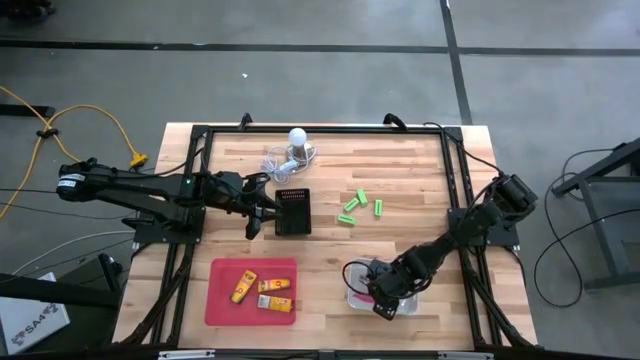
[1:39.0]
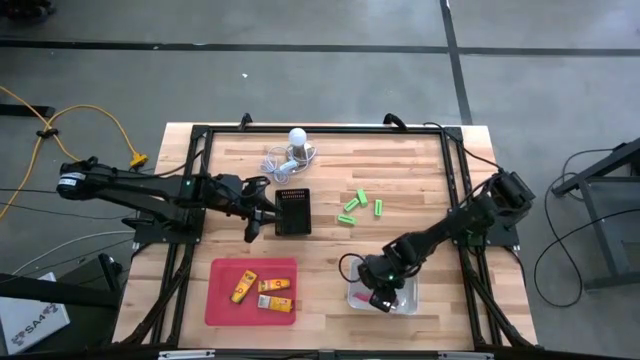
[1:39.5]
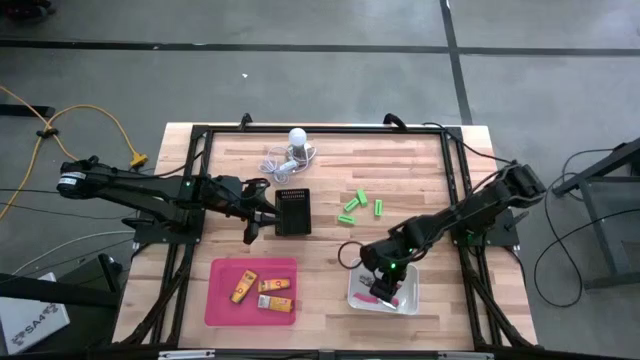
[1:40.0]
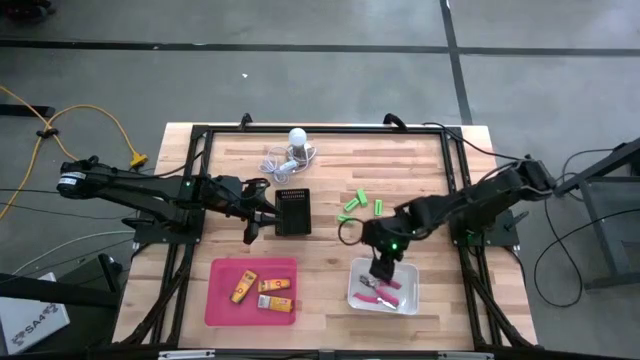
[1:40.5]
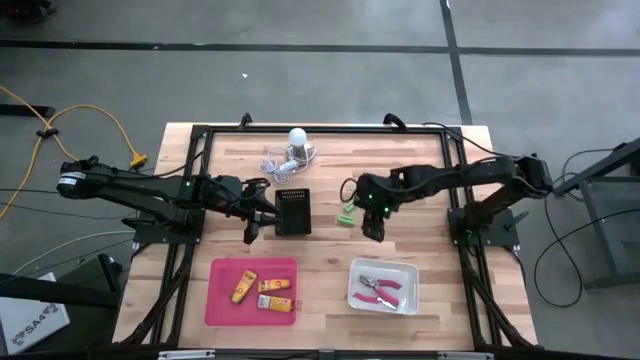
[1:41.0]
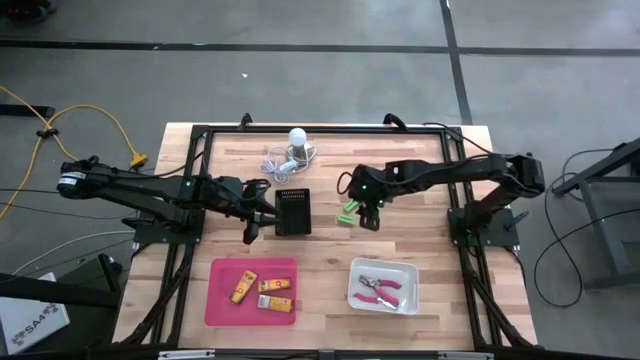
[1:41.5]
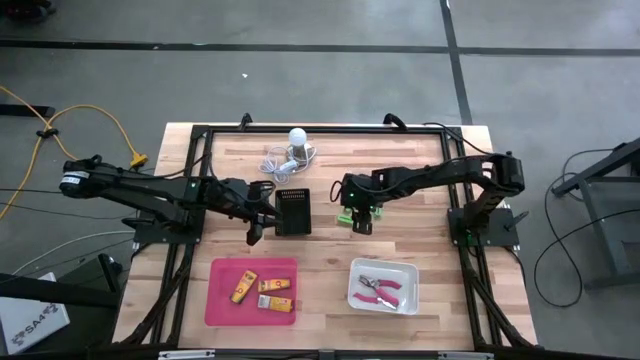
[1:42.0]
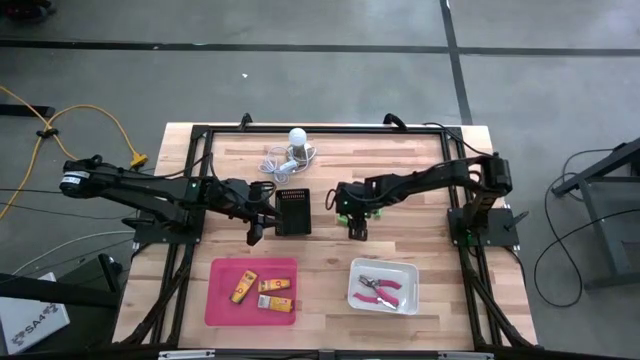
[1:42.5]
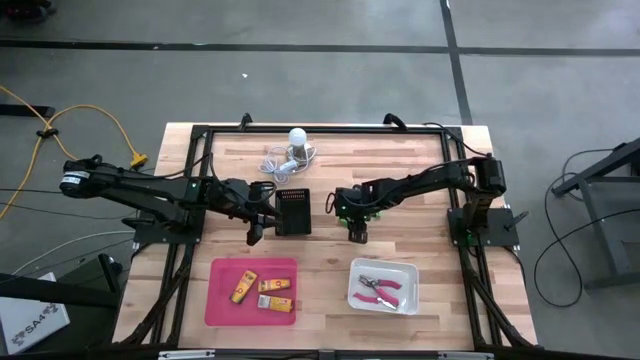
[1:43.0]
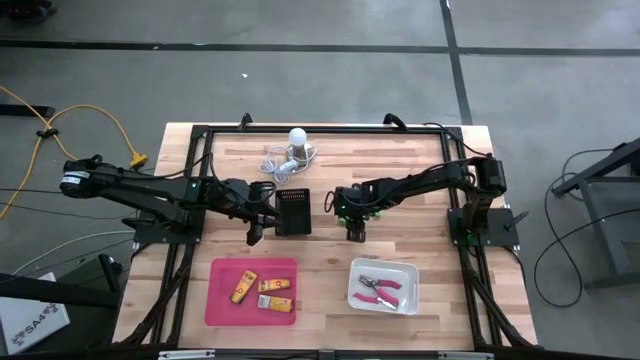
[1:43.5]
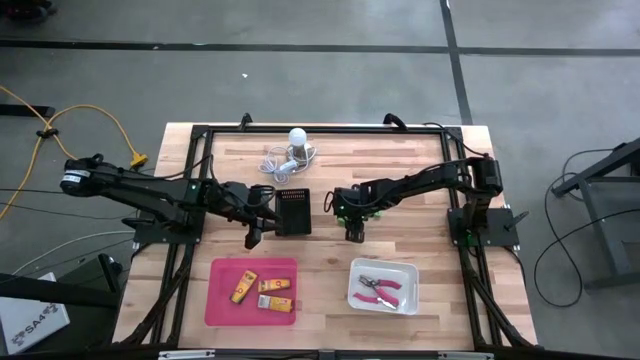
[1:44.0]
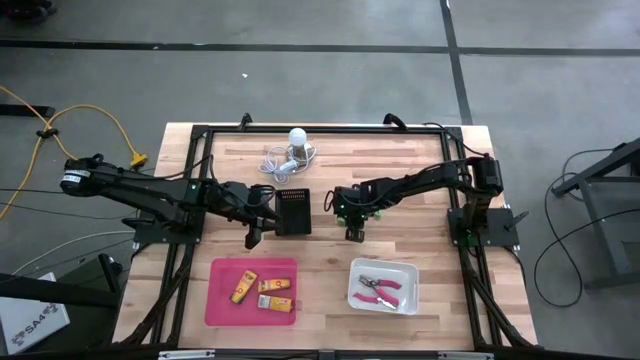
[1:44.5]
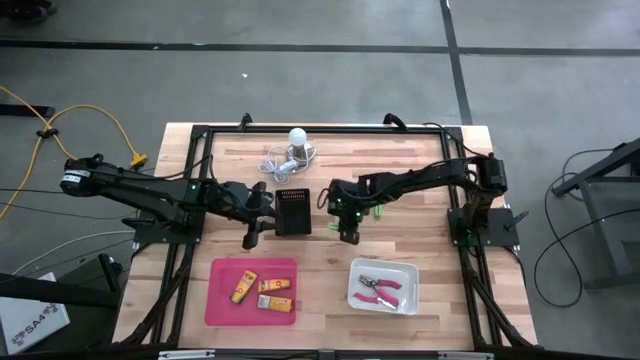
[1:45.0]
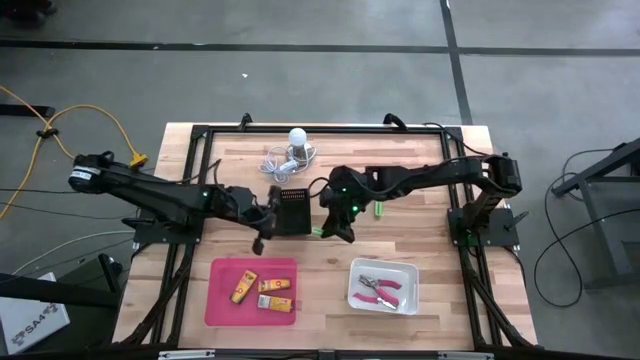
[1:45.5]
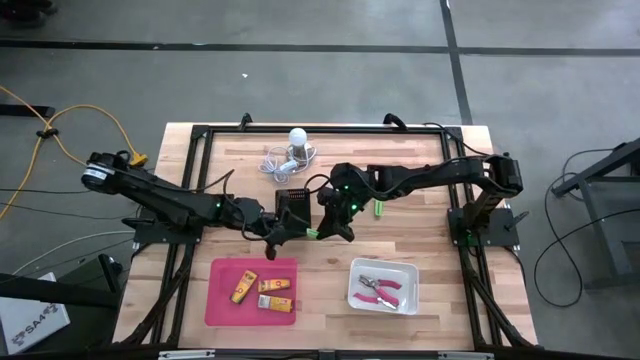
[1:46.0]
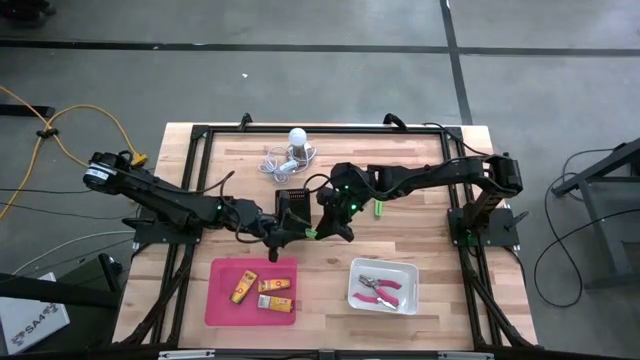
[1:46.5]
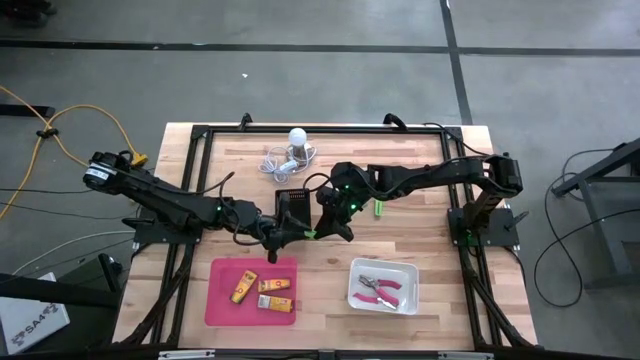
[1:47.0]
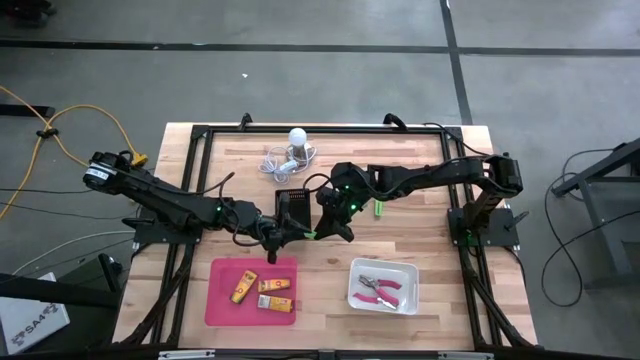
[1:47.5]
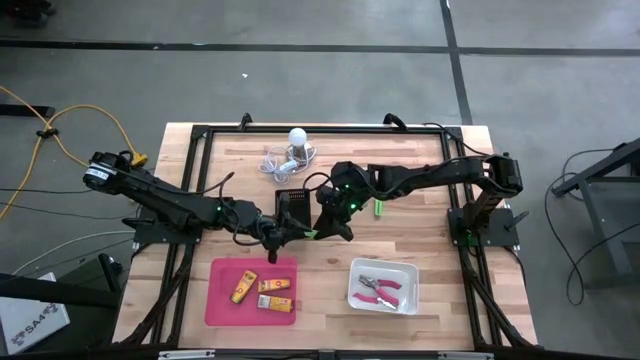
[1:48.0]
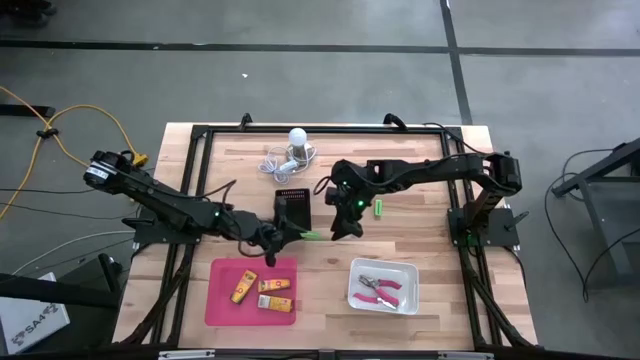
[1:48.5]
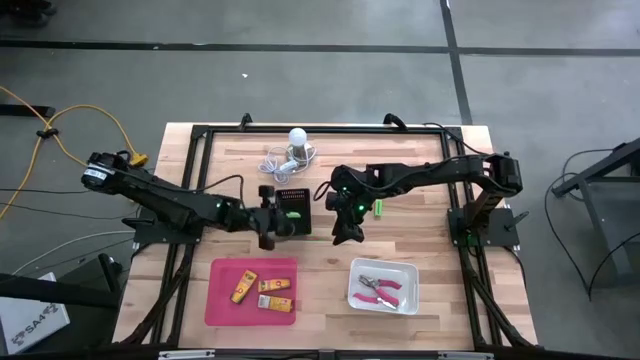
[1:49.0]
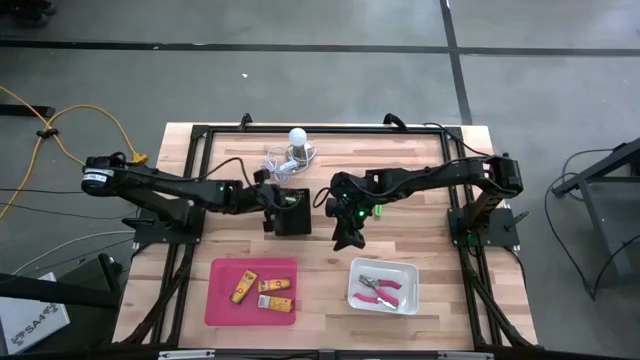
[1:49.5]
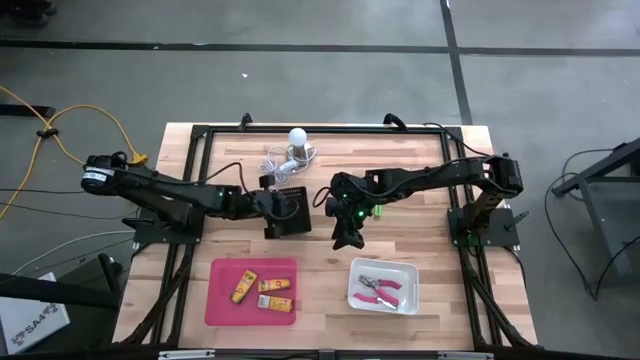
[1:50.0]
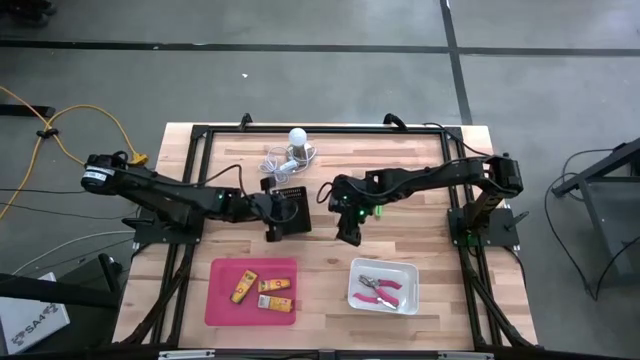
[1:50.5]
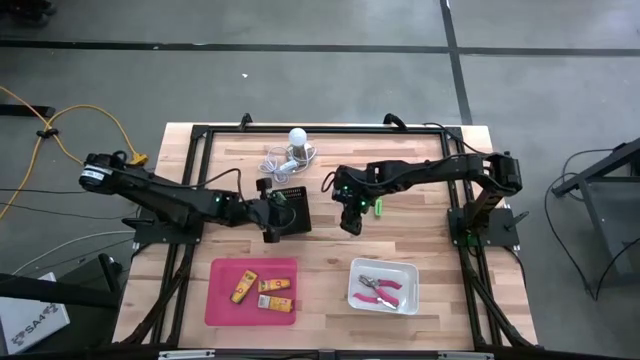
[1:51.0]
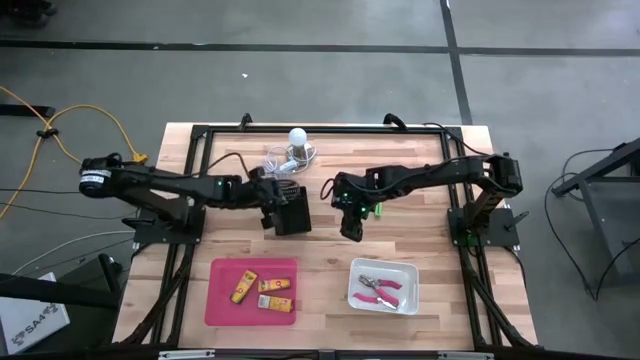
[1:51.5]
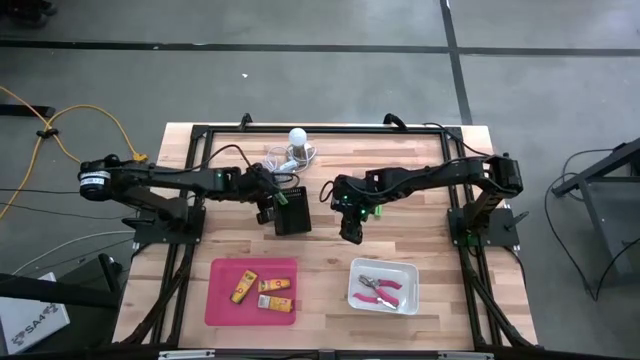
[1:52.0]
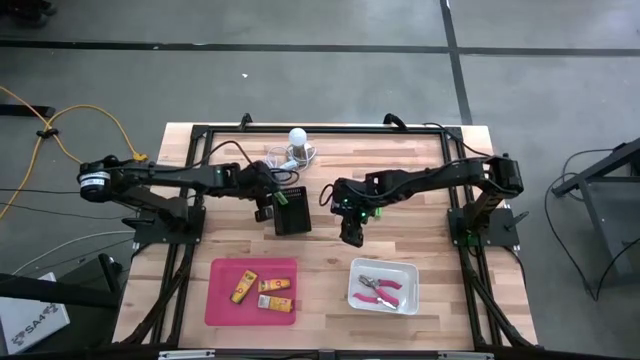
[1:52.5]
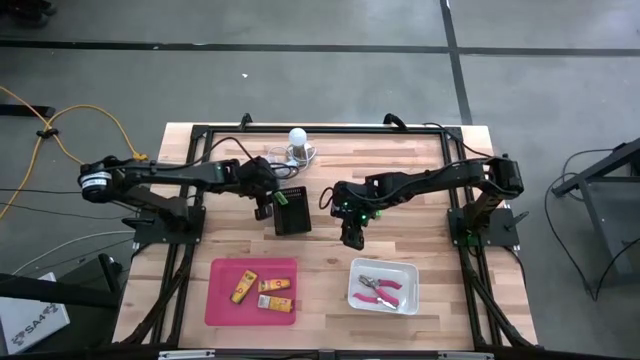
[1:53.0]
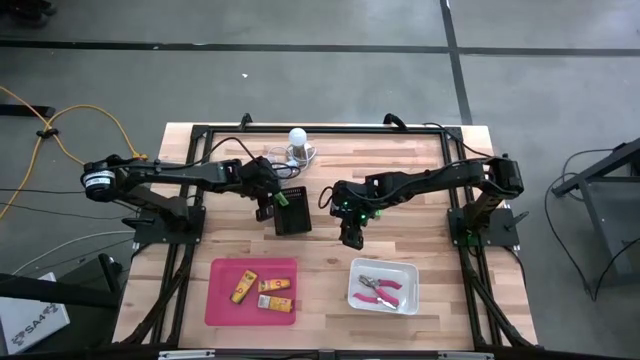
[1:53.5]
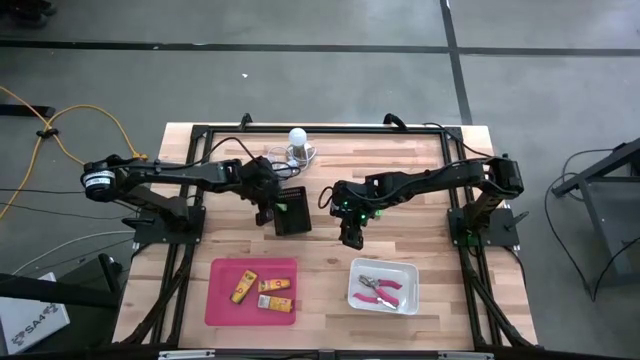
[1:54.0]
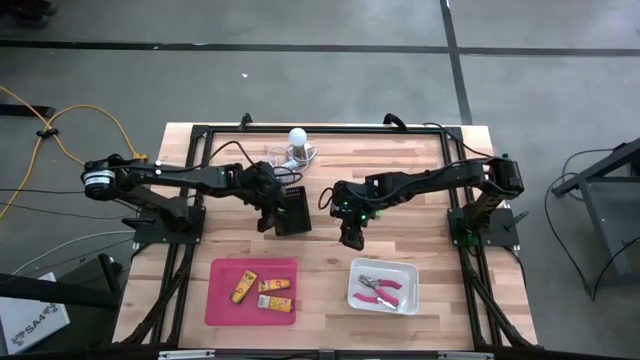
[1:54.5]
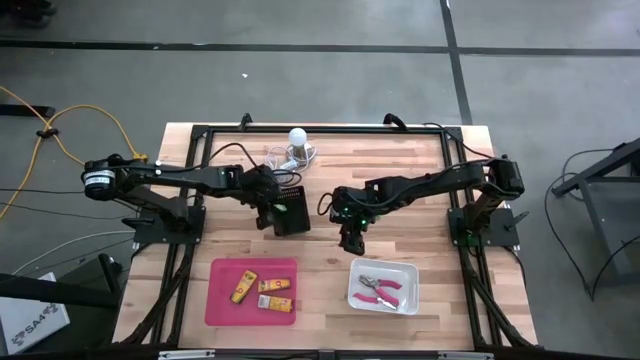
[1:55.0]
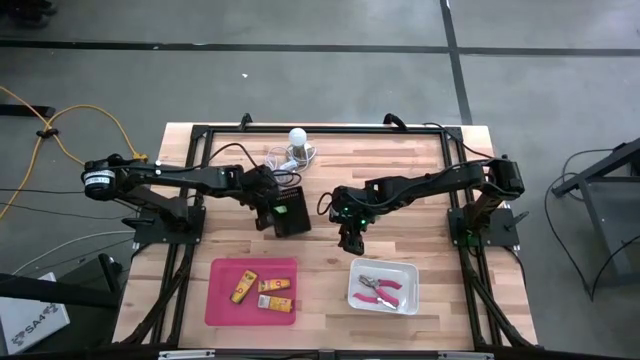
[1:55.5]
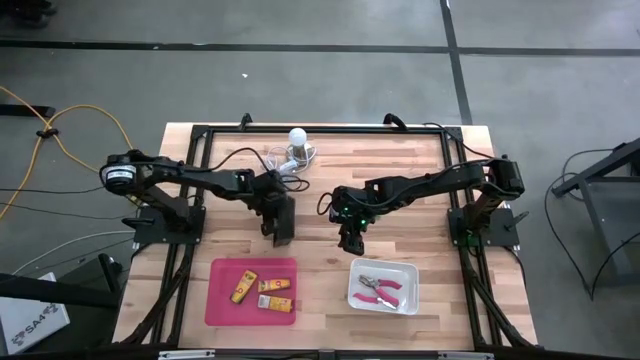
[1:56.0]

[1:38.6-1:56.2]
Task: Pick & Place School Supplies
Put the green eraser into the black bin

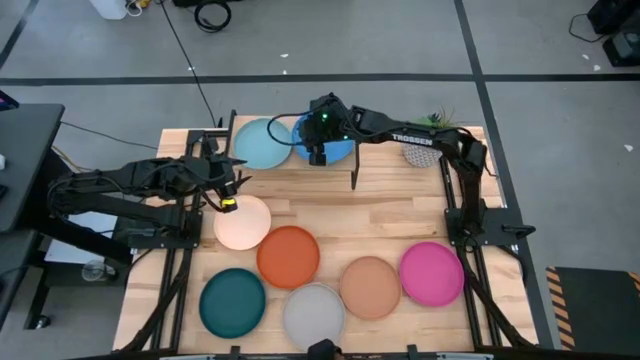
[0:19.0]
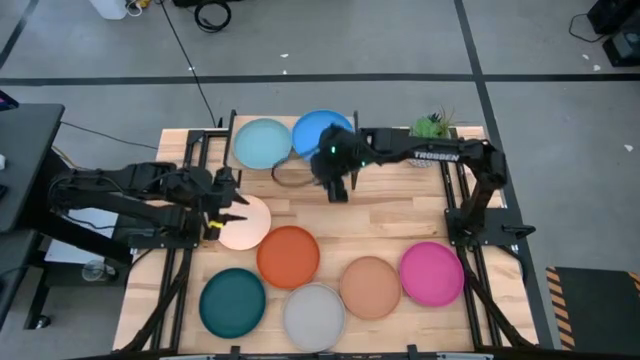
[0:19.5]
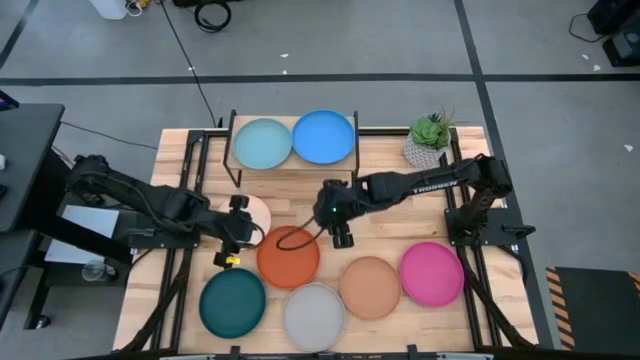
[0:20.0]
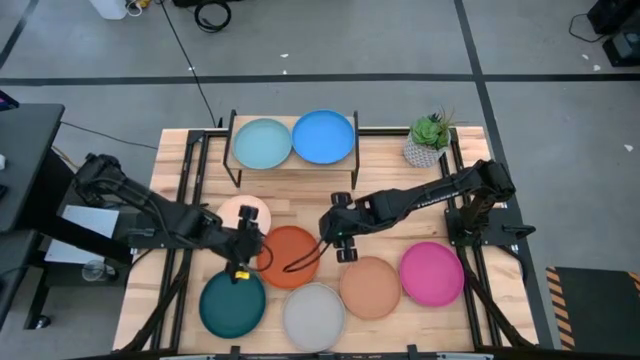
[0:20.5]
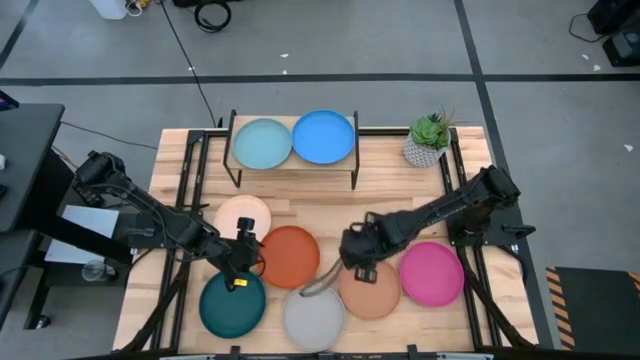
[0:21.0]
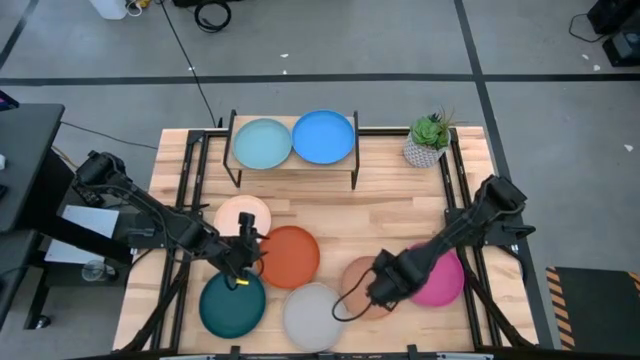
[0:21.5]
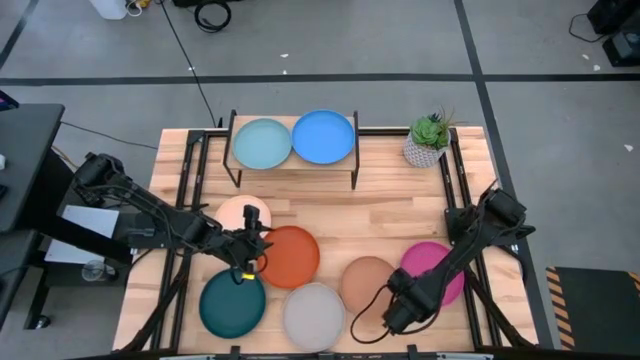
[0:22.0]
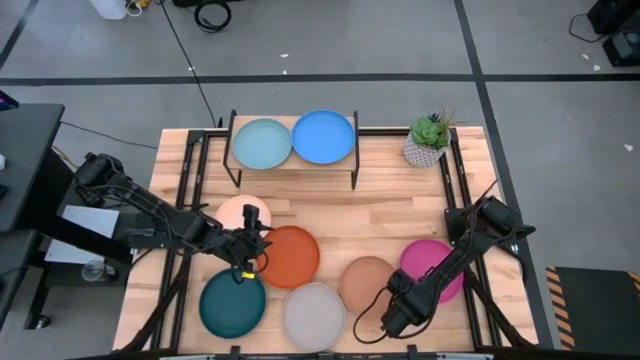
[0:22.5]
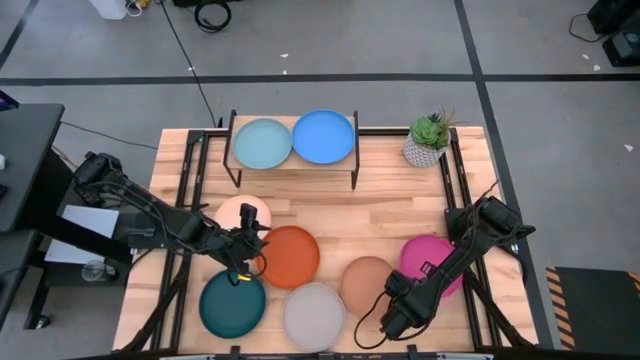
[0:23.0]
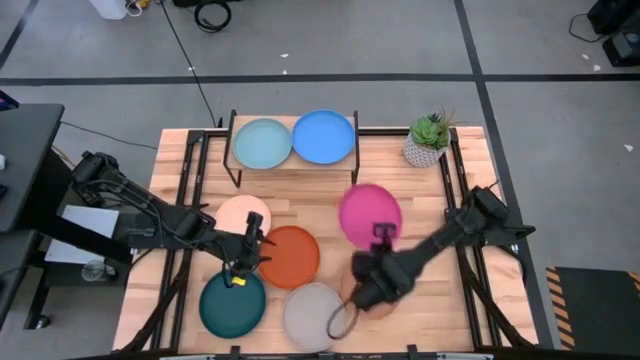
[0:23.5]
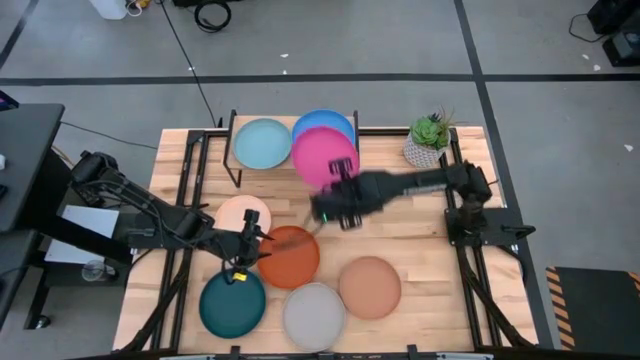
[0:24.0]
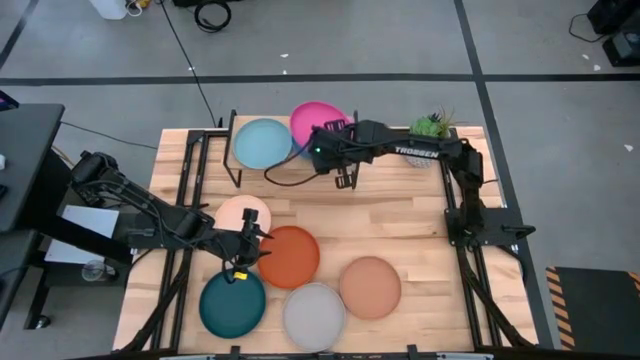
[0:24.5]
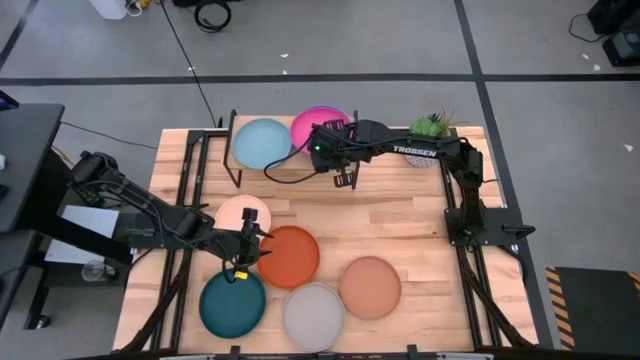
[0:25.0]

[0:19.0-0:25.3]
Task: Place and stack plates onto a shelf
Stack the pink plate on top of the blue plate on the shelf
